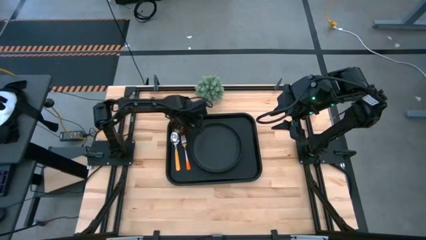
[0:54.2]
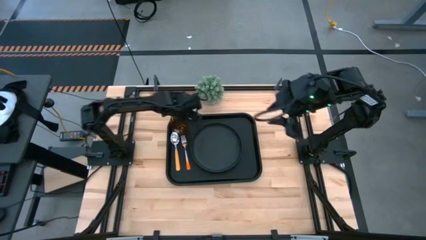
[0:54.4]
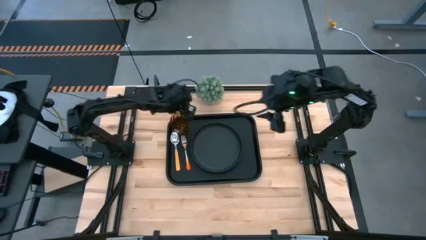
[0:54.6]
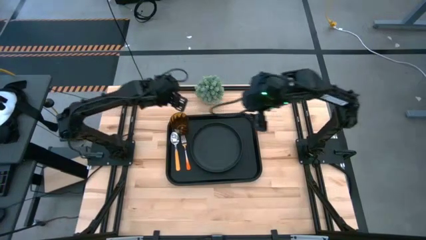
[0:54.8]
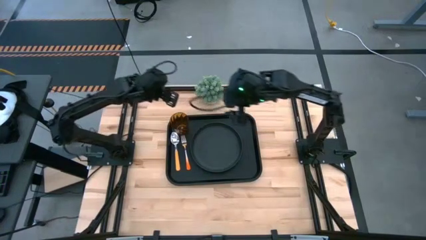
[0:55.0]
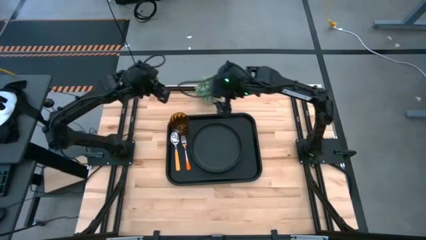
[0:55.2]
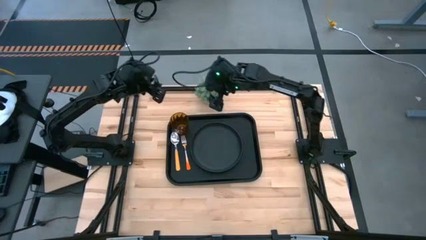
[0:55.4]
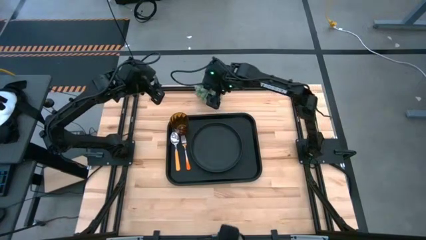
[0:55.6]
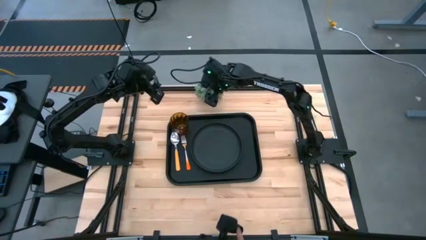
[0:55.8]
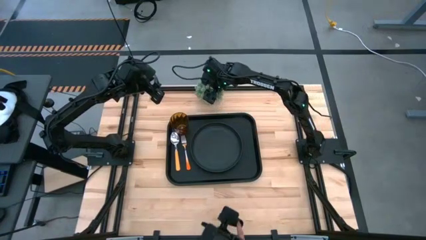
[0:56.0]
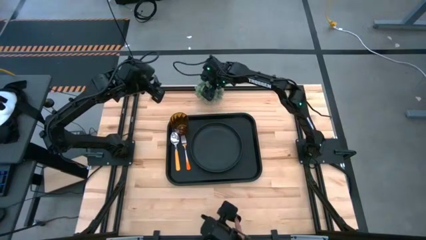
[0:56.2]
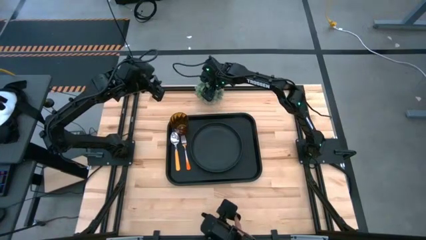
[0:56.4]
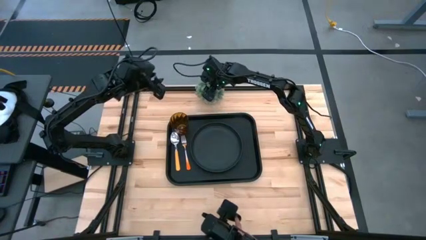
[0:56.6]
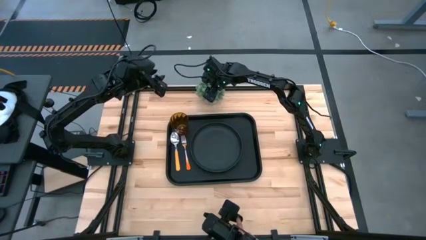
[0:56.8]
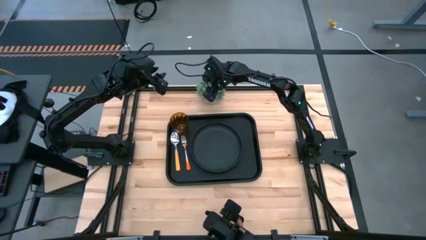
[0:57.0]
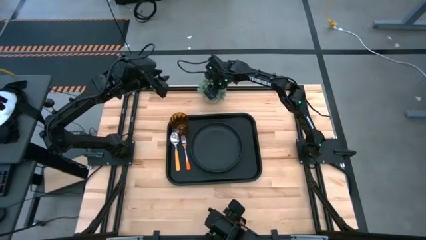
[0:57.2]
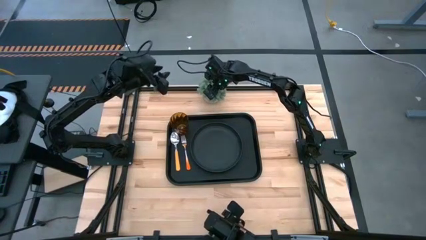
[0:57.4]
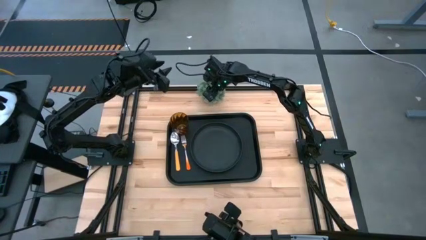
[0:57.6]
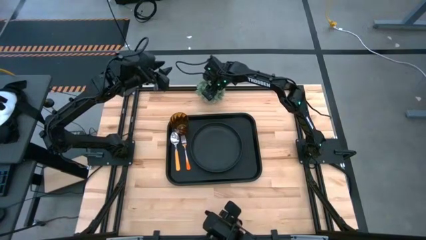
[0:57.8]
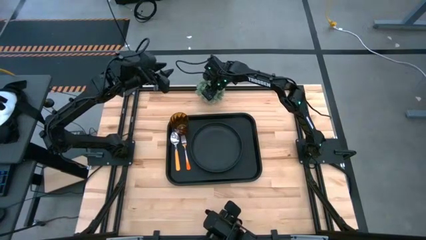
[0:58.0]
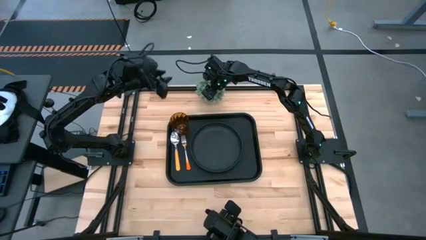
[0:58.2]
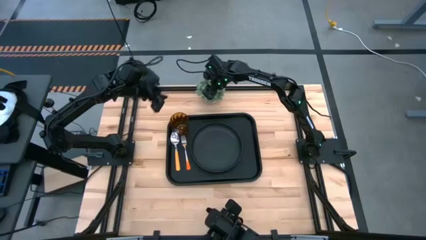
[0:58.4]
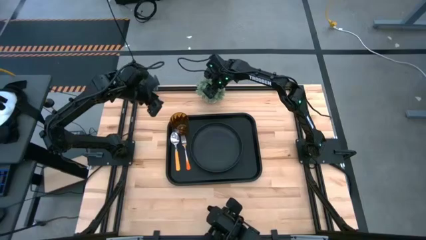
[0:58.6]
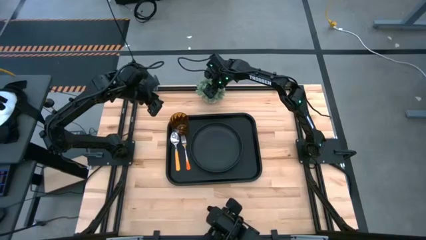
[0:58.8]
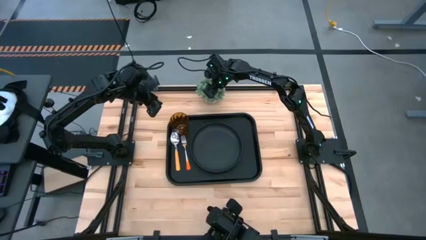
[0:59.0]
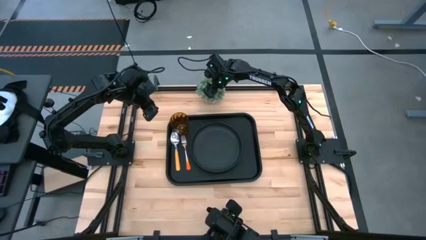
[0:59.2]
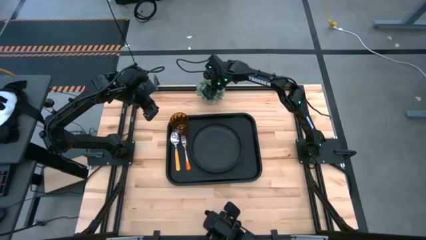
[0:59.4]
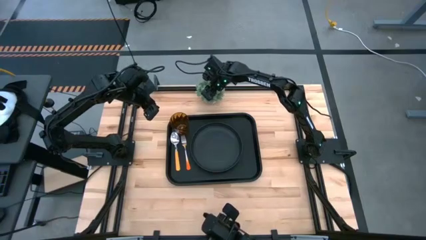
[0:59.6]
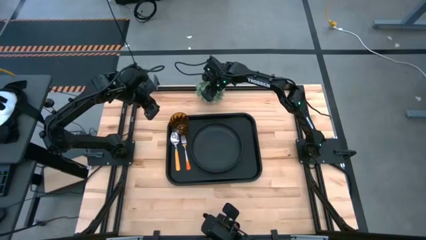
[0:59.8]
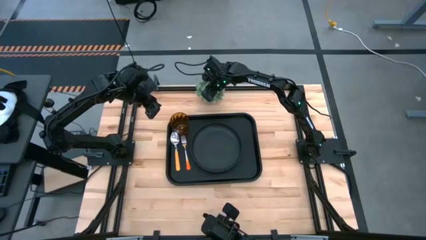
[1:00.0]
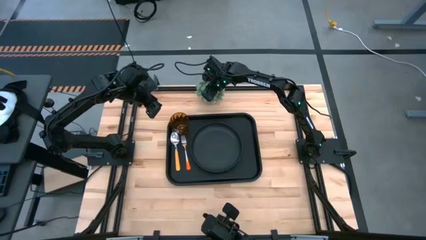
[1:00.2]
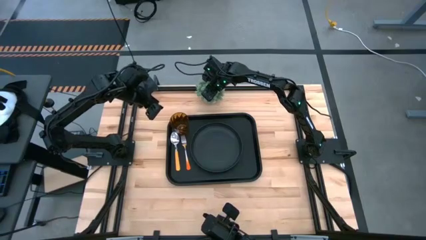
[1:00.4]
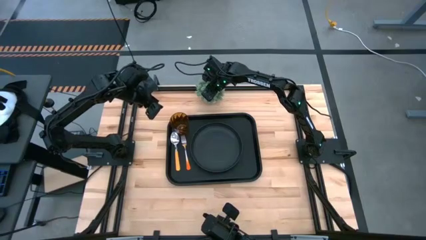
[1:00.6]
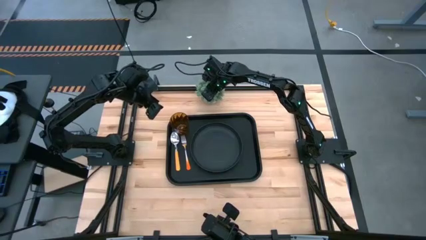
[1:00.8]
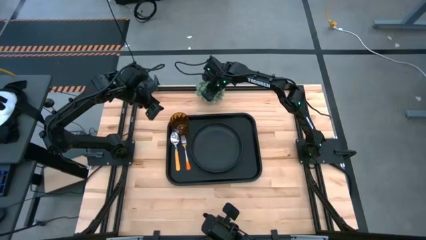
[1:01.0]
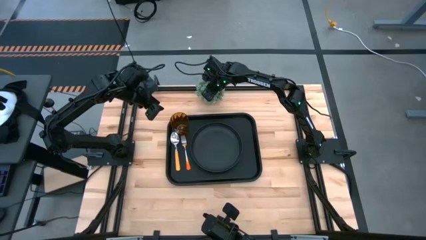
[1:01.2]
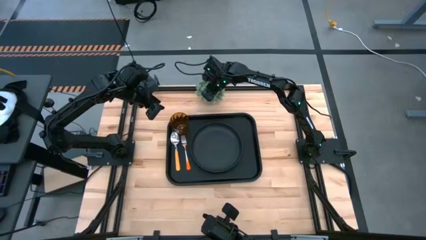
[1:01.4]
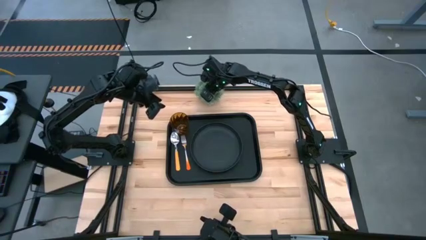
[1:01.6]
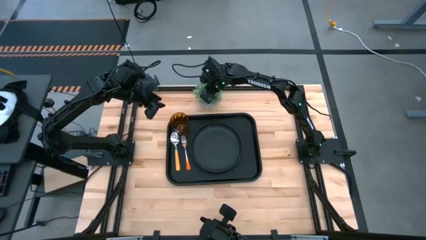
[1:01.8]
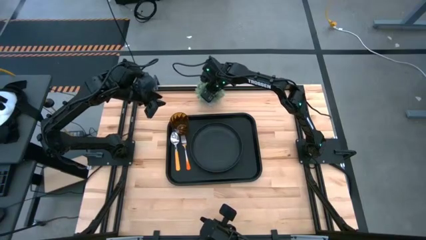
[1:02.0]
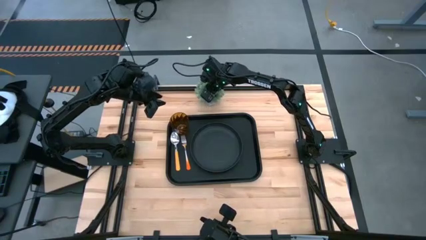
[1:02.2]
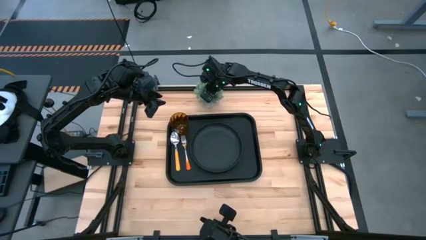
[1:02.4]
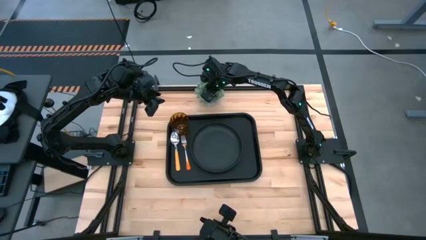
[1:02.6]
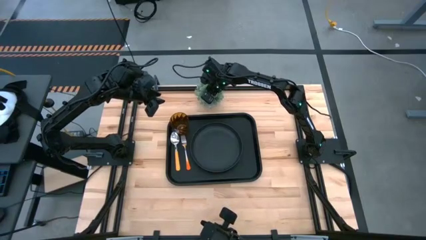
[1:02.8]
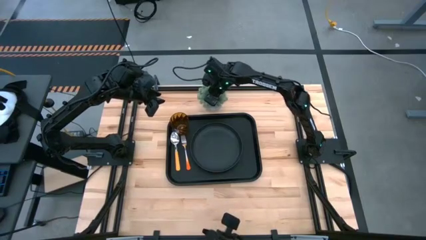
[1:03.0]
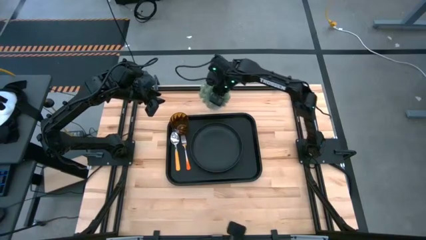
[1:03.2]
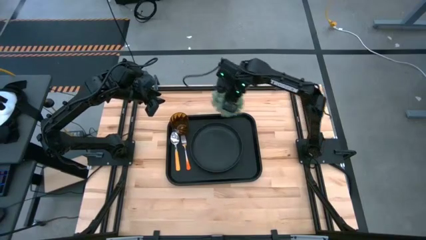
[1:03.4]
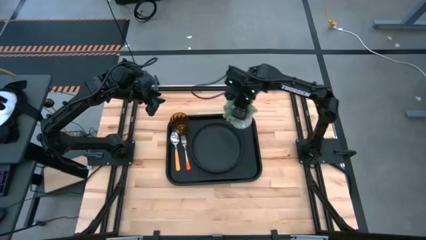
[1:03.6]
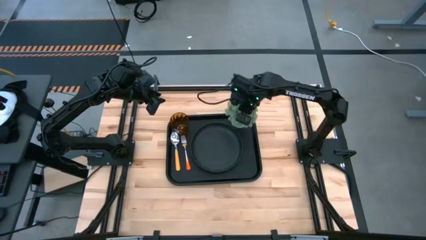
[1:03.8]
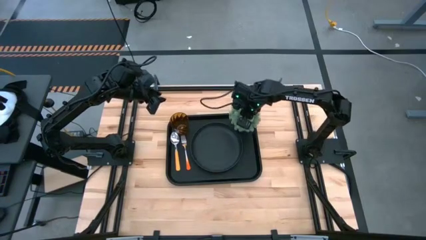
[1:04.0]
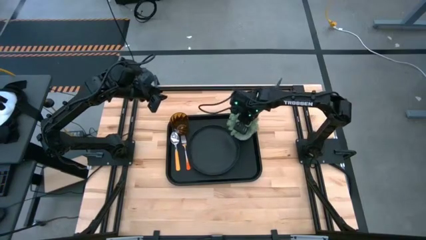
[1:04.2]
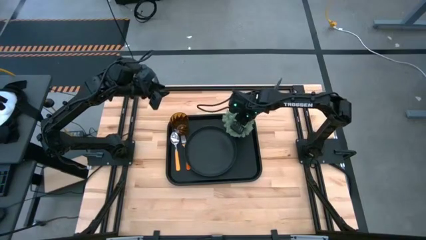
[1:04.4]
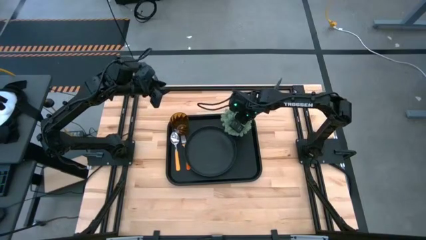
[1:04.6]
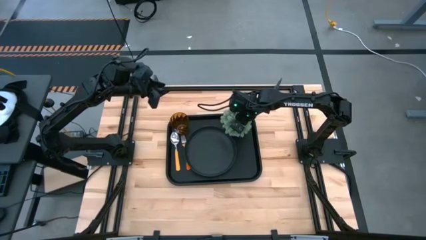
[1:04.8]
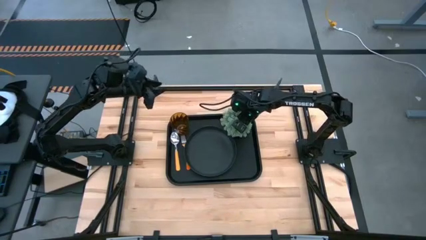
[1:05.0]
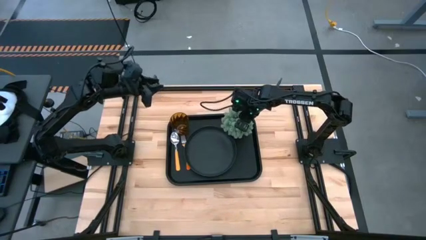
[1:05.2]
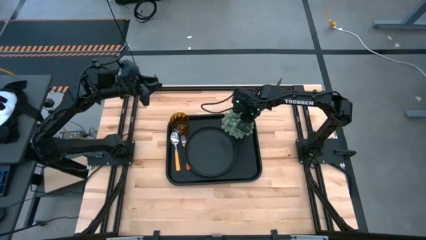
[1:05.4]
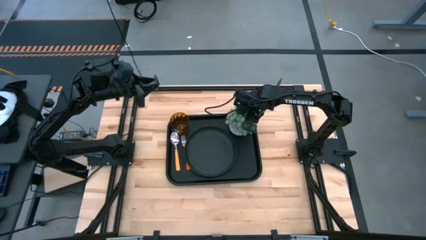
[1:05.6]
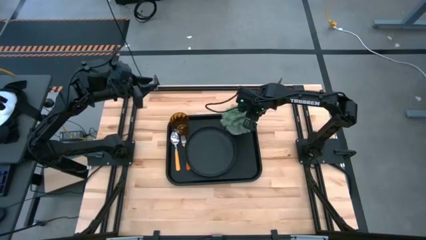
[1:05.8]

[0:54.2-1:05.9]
Task: Pick and place plate/cup/fork/spoon on tray
Put the gray potted plant on the black serving tray to the top right of the black plate

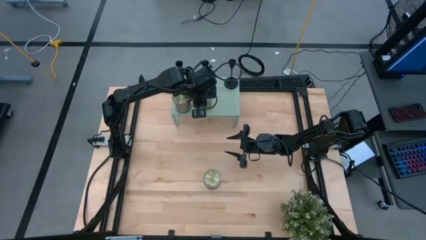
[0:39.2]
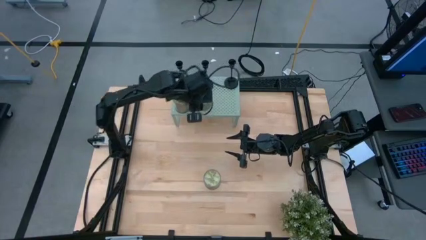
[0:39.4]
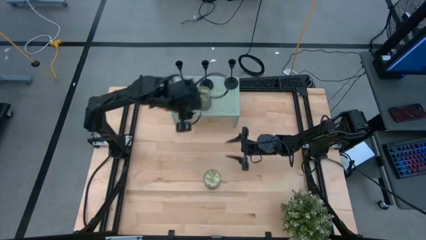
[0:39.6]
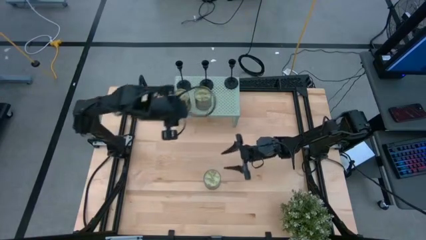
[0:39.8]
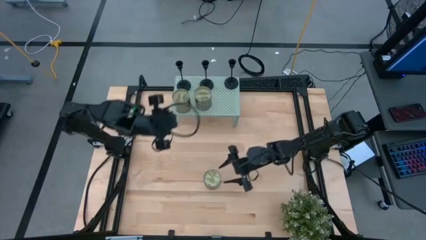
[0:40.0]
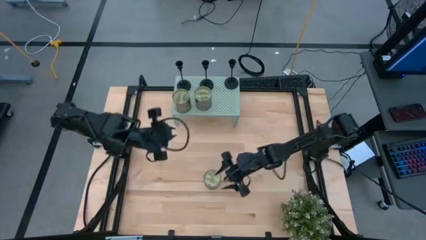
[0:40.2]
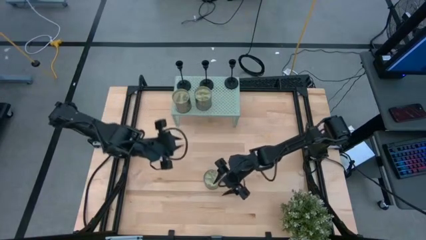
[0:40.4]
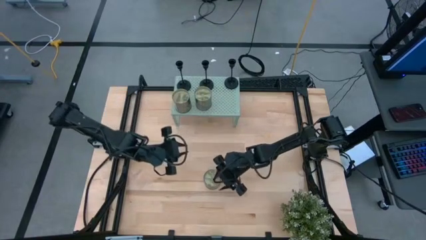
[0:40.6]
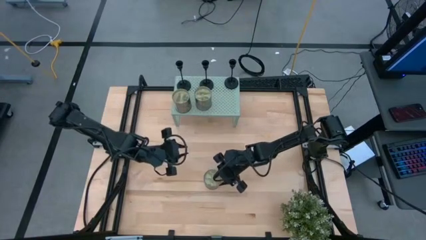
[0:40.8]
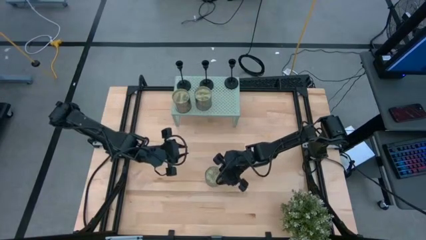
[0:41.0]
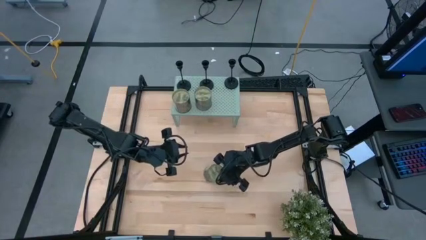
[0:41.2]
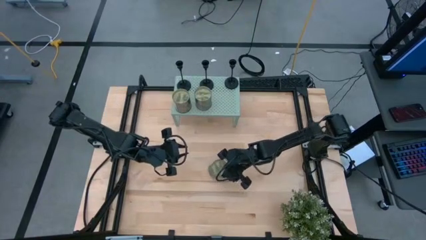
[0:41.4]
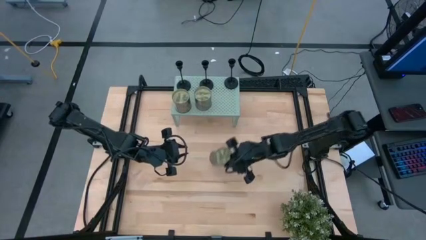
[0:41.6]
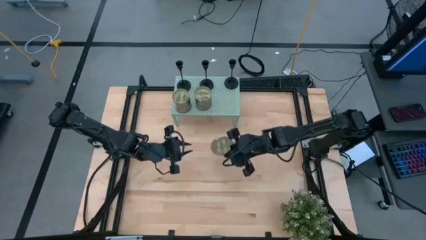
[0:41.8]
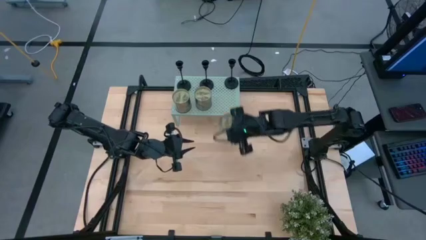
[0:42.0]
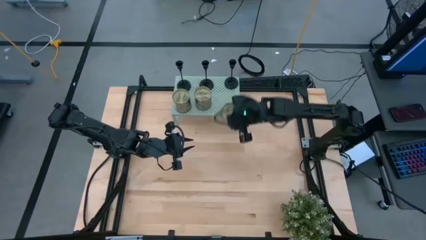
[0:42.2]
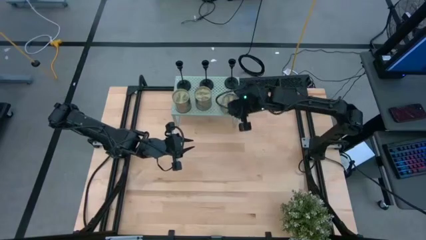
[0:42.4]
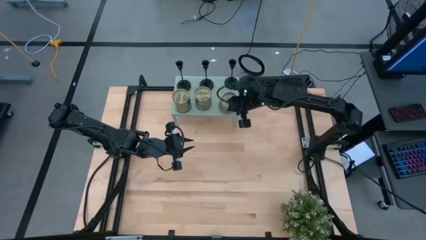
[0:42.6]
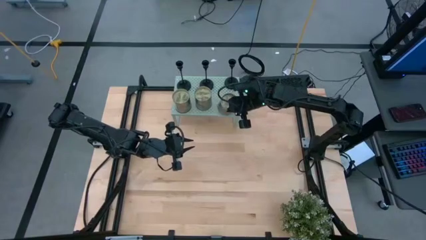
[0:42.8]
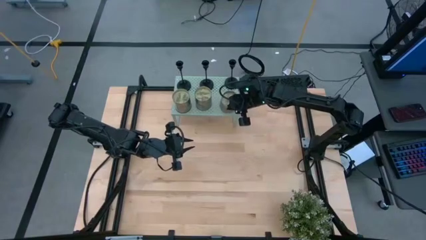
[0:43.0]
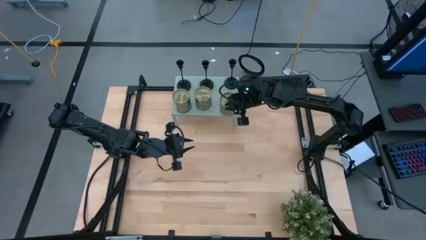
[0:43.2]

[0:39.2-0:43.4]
Task: Pick & Place candle stick holders
Put the scented candle on the shelf
